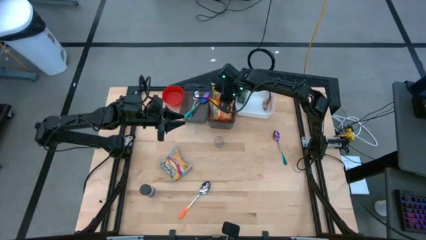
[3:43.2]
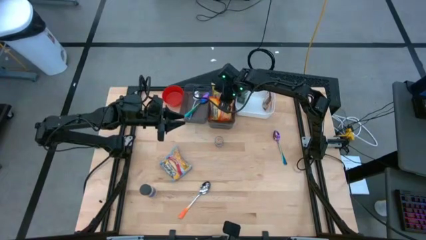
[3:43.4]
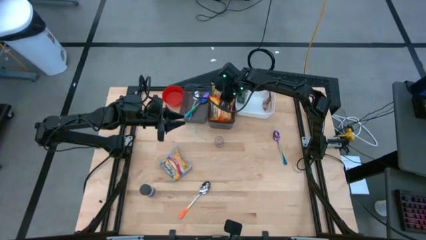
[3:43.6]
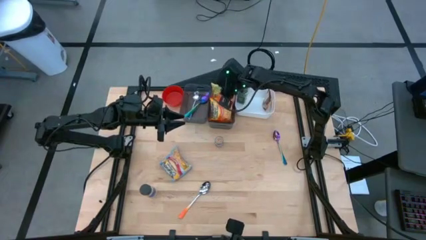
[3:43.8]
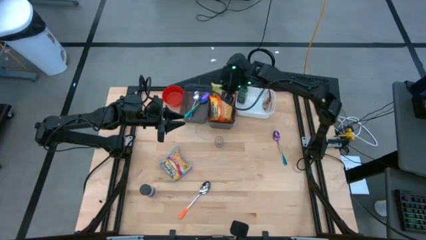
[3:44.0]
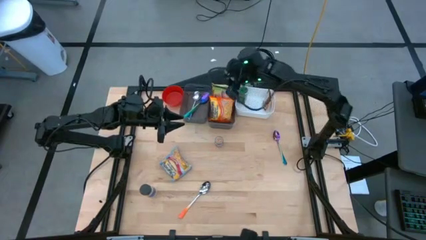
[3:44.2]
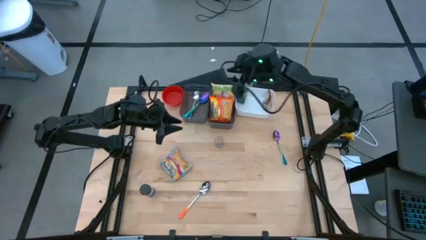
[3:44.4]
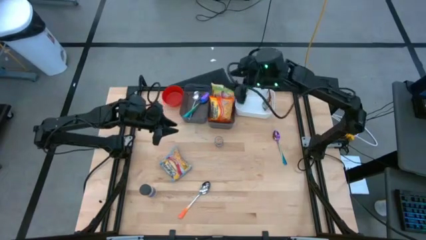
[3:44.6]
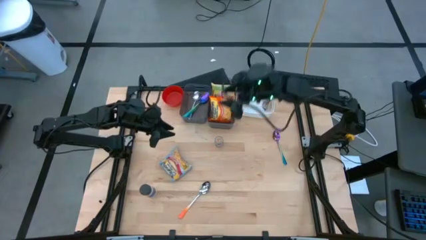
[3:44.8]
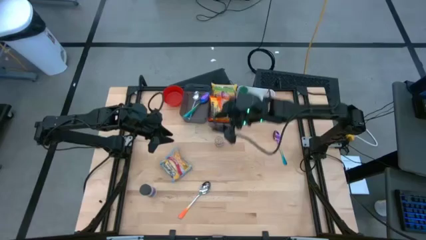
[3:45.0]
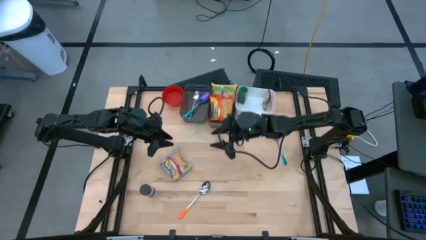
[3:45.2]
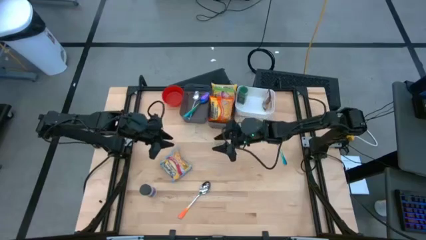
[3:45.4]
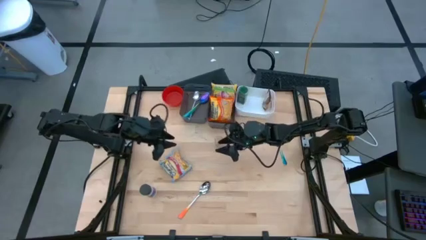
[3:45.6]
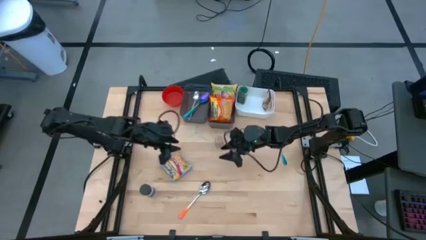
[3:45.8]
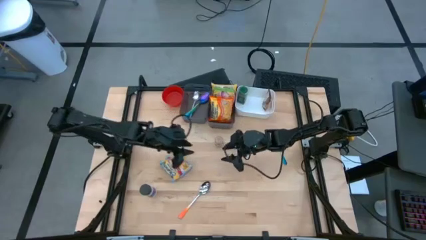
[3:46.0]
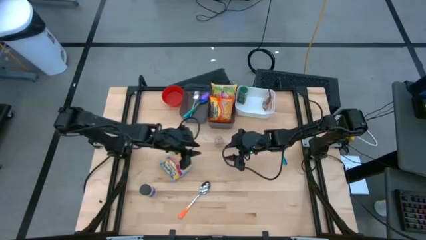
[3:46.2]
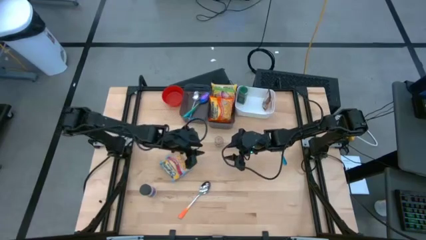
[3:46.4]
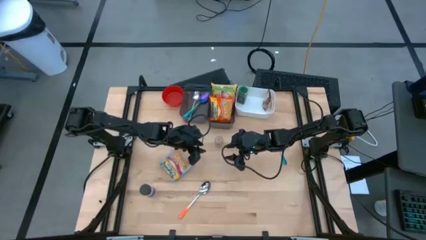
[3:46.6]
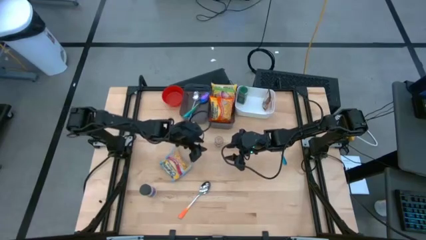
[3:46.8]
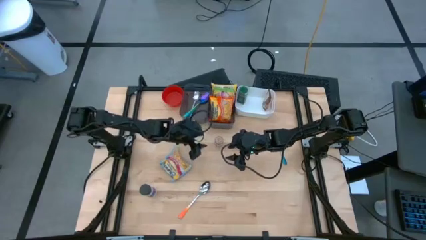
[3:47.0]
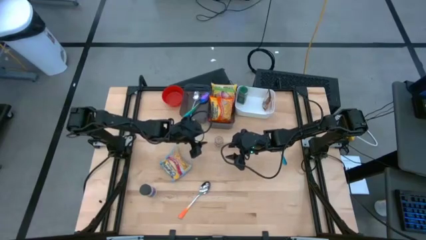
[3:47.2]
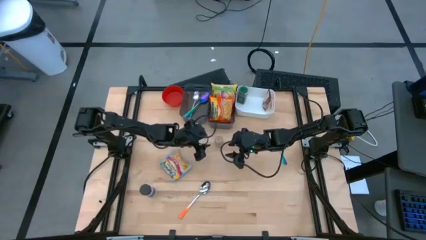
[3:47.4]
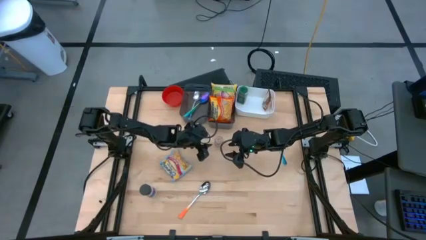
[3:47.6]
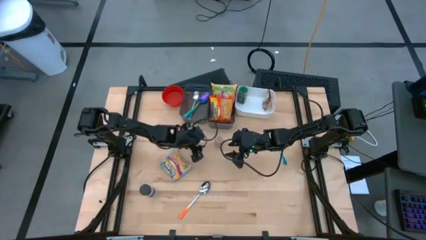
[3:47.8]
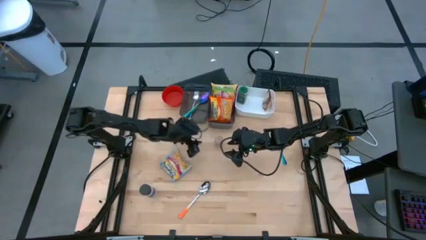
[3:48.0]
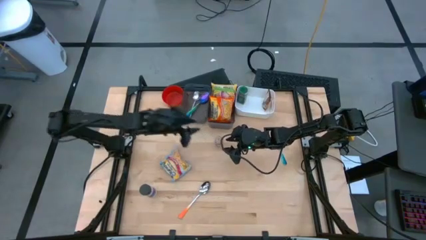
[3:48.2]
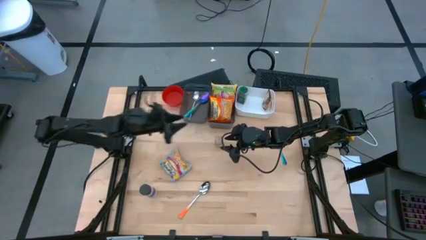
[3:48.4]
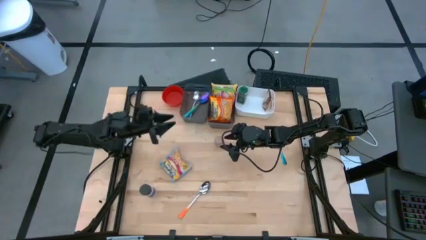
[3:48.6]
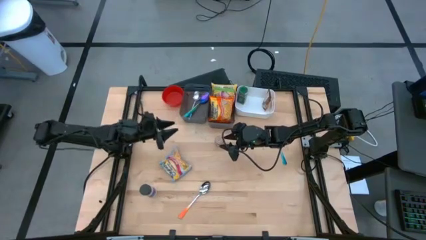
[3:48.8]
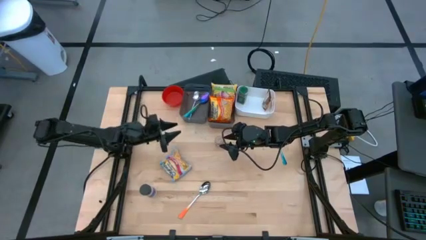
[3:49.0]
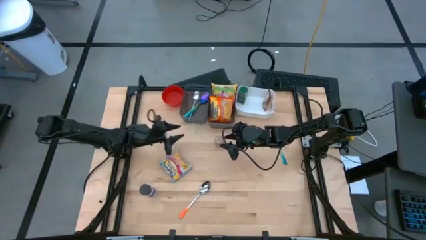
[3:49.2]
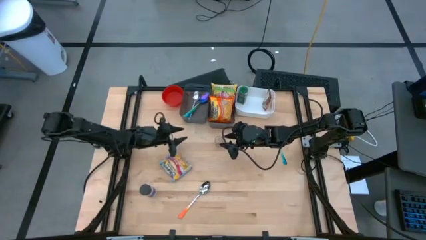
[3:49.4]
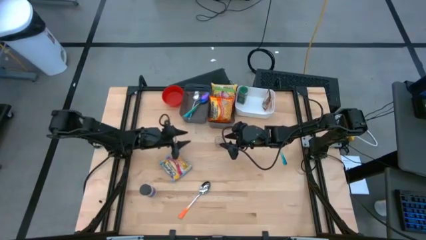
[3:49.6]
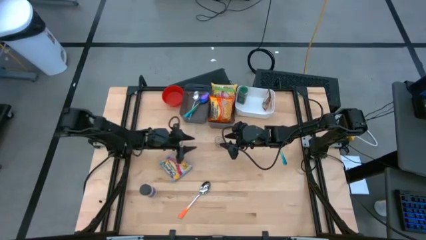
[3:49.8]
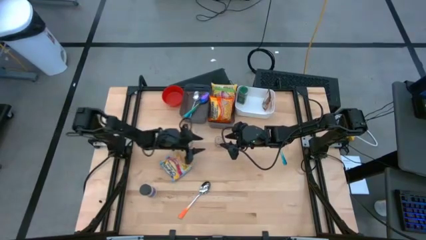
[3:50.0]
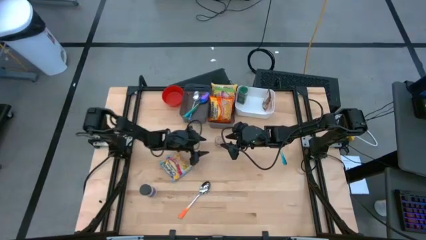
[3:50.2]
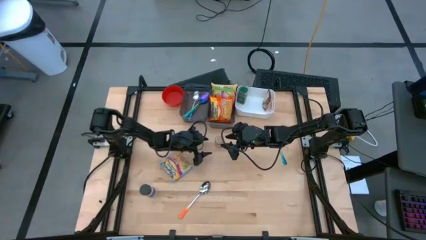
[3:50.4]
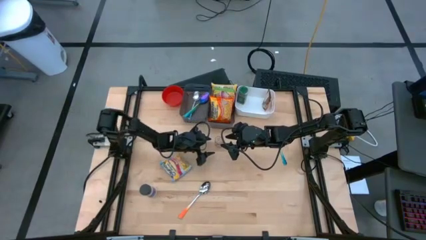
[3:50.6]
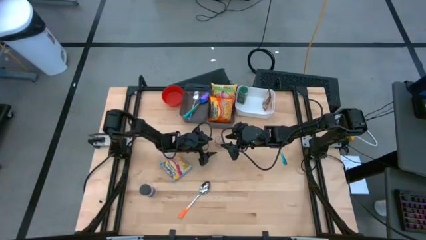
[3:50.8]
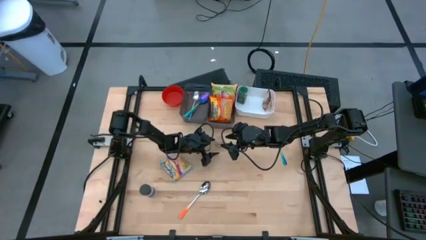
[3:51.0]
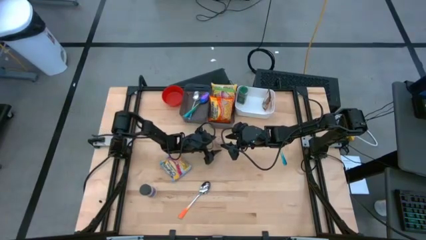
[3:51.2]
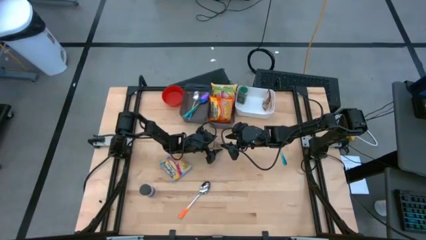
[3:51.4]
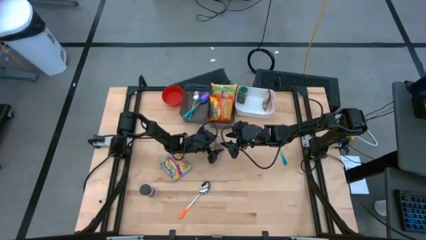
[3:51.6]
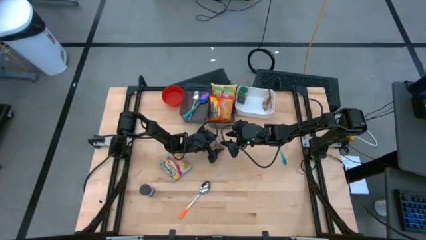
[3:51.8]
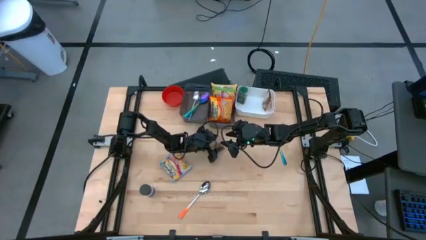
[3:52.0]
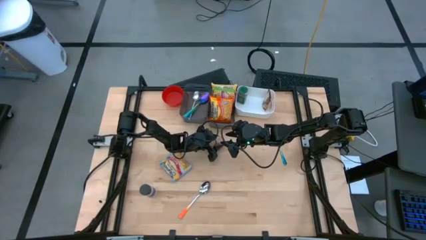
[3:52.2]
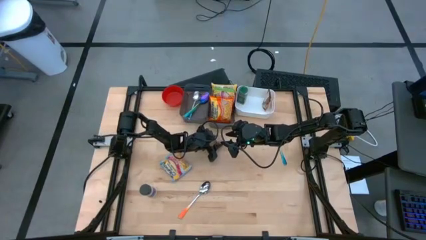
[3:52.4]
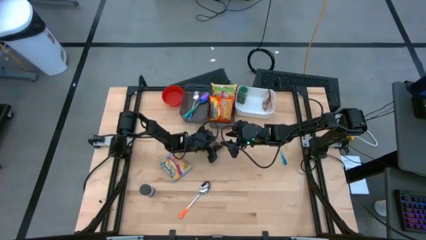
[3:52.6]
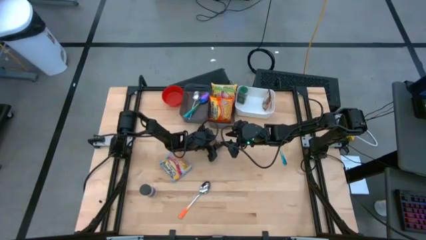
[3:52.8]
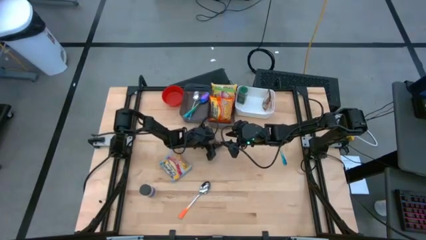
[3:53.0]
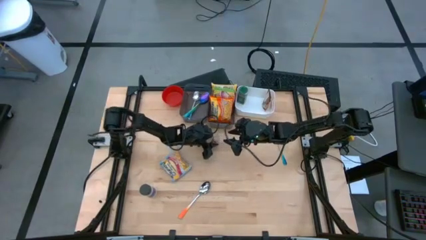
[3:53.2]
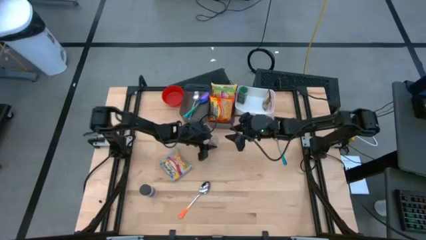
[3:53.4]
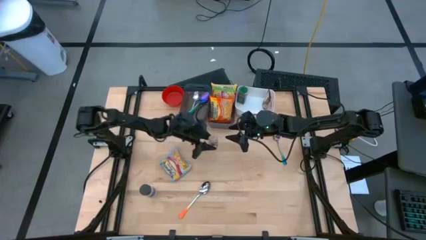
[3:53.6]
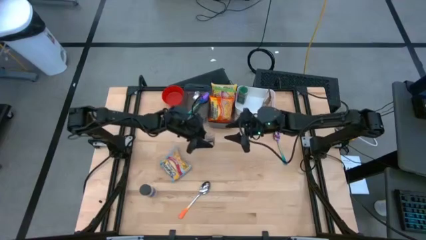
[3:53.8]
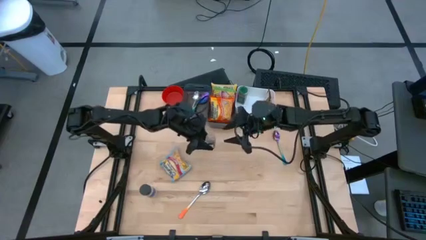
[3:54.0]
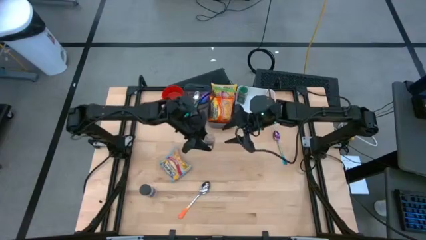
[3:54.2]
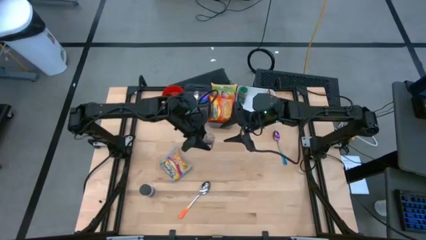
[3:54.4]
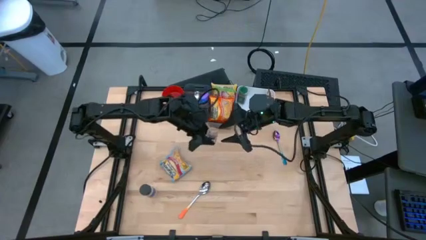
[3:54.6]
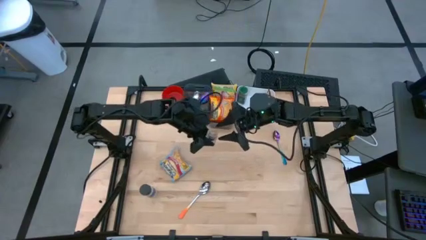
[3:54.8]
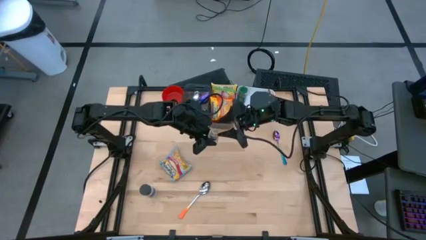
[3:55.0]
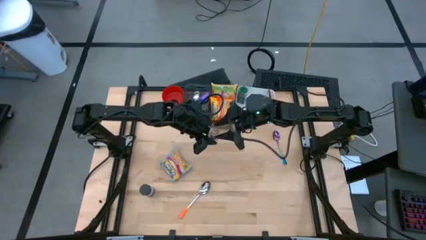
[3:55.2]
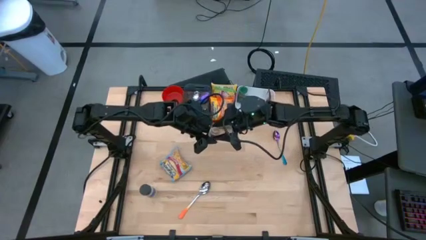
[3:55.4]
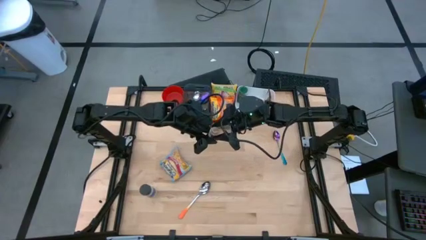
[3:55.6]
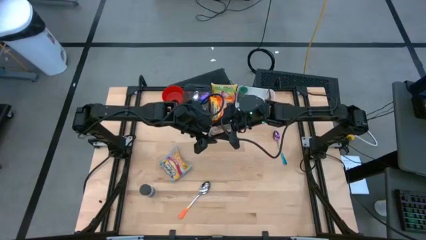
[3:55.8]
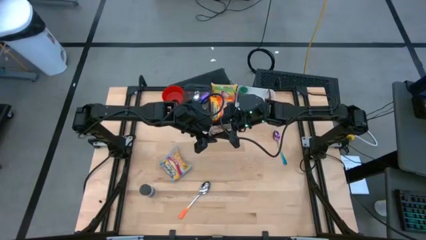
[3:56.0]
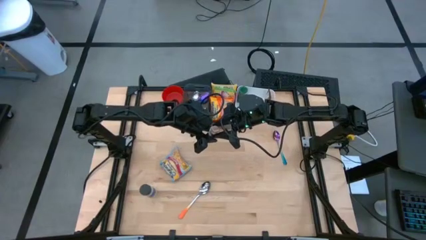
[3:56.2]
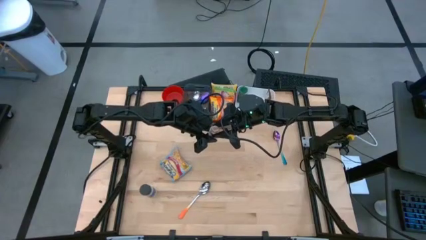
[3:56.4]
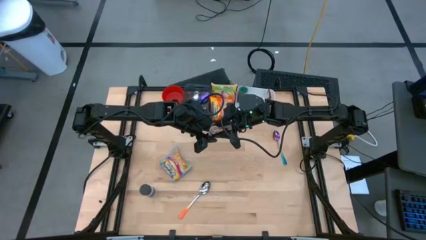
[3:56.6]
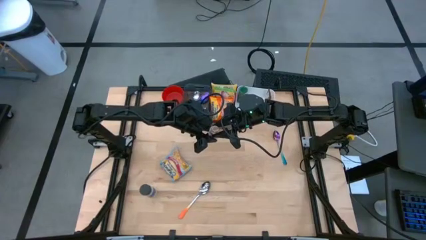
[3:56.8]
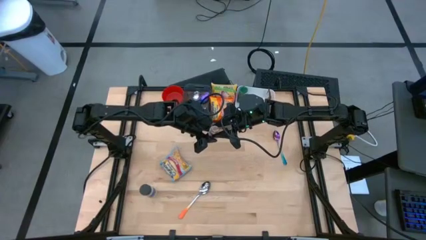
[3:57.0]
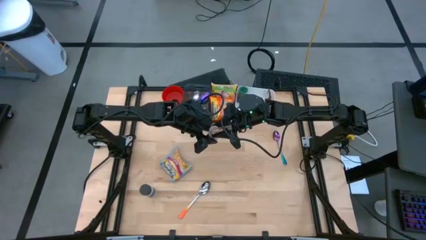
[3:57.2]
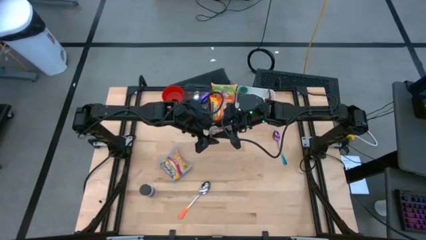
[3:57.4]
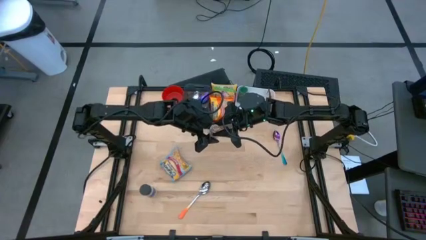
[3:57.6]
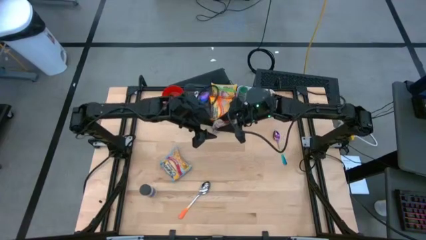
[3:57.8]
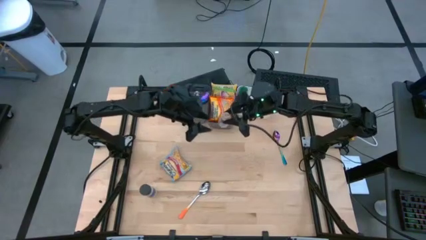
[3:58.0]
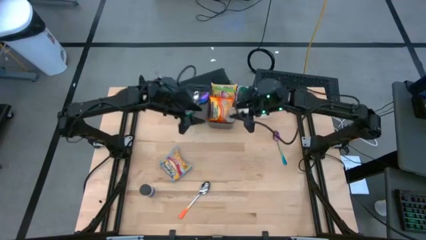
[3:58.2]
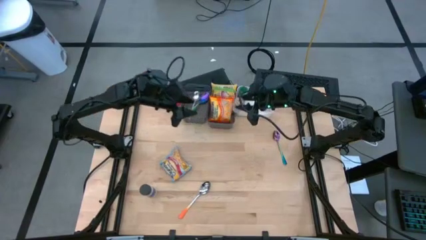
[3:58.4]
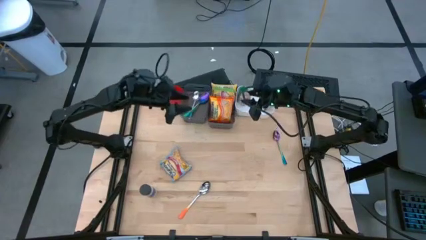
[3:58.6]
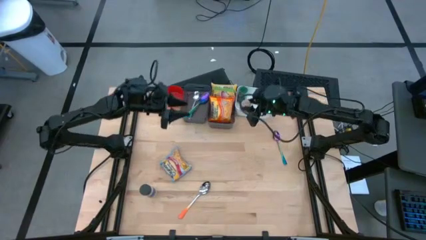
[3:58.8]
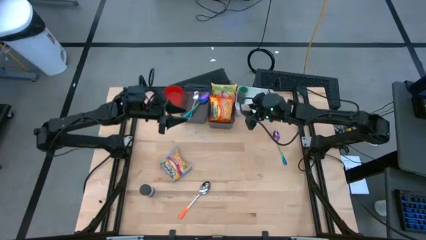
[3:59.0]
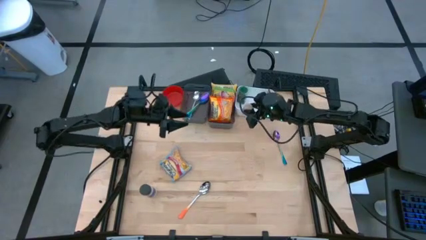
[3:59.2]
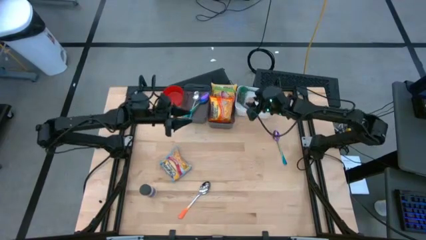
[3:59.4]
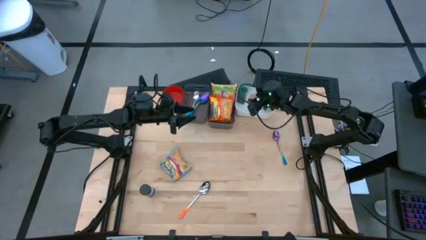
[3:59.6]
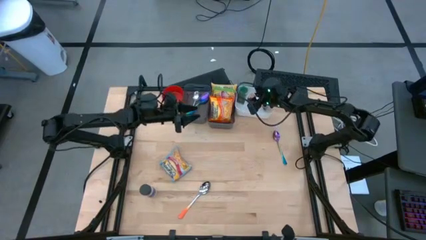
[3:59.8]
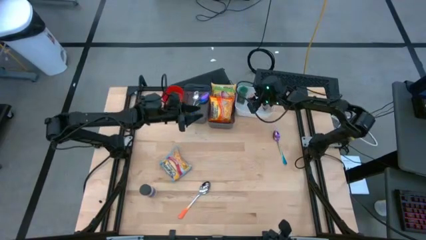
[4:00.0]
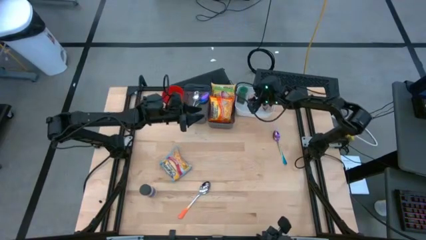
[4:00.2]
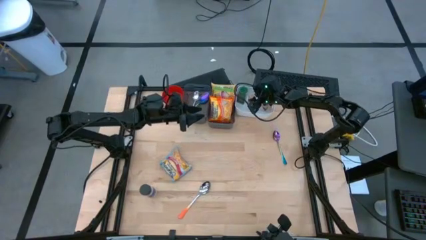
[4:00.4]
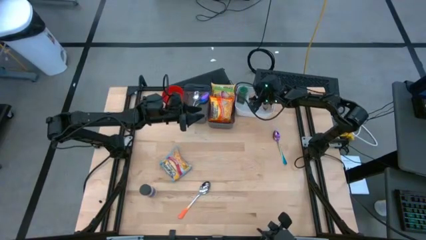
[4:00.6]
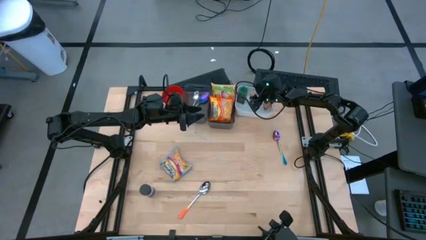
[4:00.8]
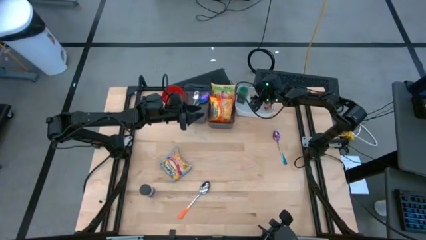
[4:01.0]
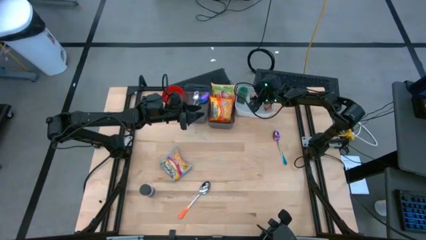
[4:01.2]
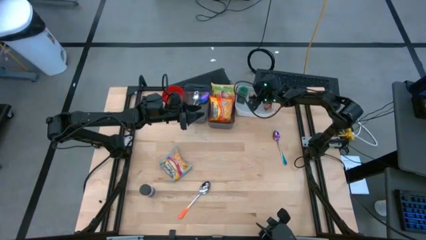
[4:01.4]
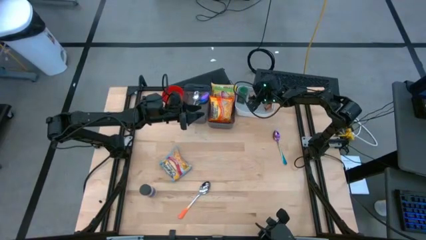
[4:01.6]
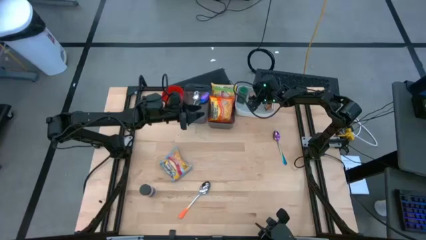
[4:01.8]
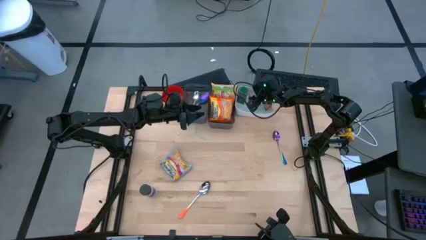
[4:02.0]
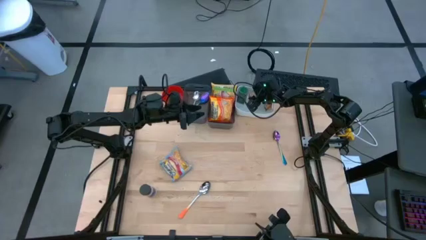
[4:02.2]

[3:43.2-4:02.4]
Task: Pick & Place Food Item
Put the brown seasoning bottle into the white bin
